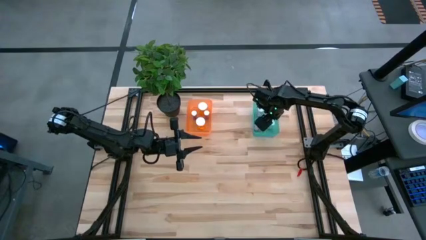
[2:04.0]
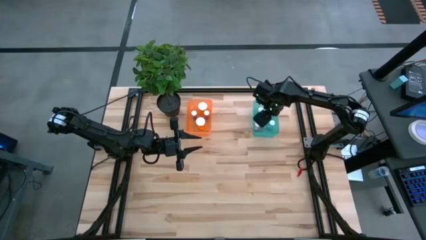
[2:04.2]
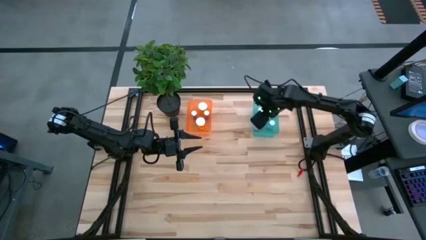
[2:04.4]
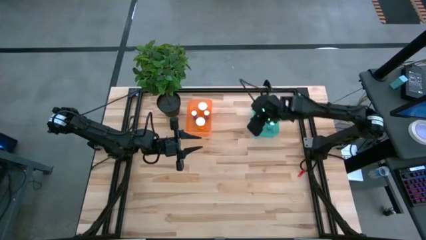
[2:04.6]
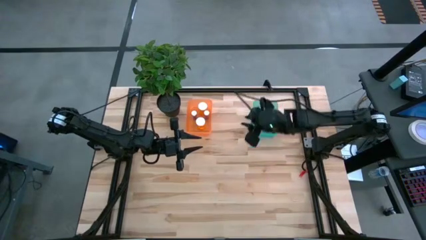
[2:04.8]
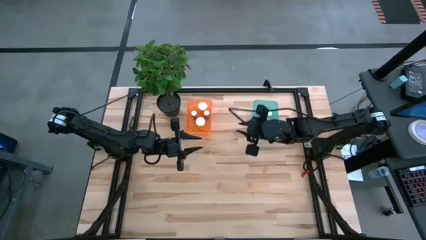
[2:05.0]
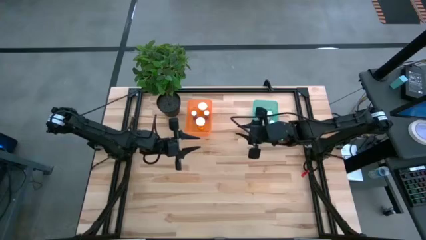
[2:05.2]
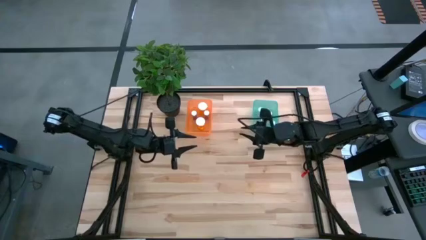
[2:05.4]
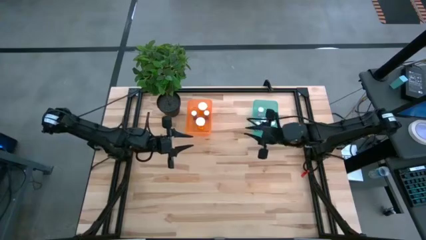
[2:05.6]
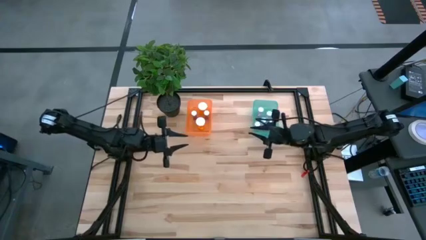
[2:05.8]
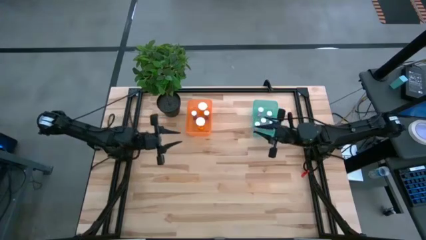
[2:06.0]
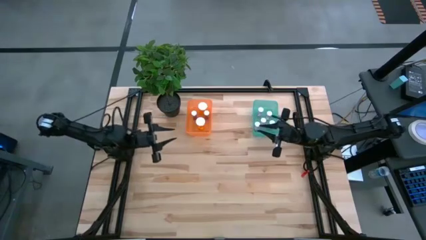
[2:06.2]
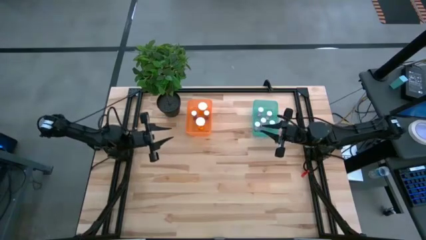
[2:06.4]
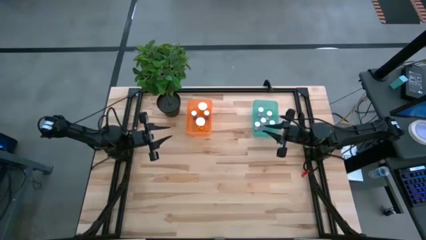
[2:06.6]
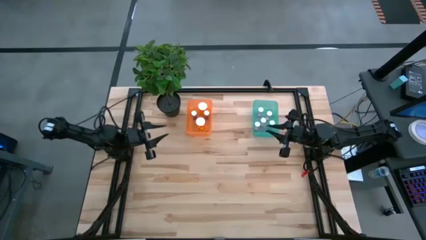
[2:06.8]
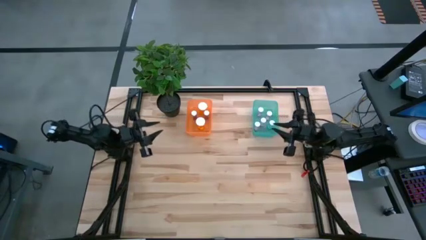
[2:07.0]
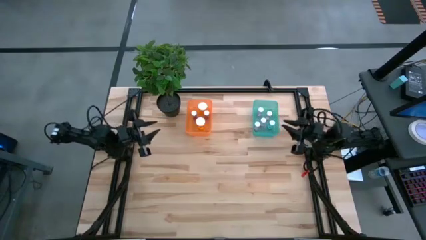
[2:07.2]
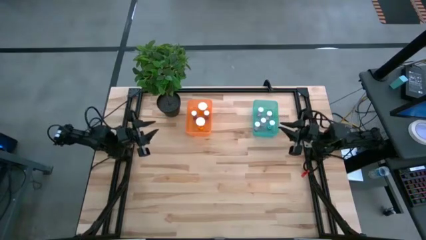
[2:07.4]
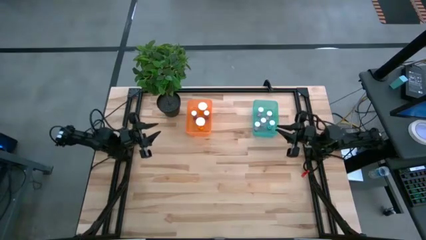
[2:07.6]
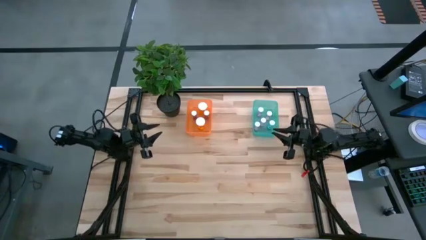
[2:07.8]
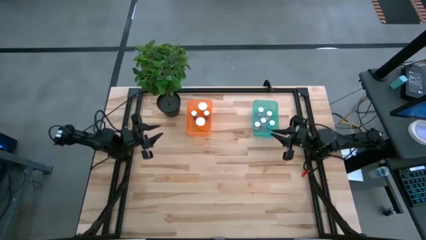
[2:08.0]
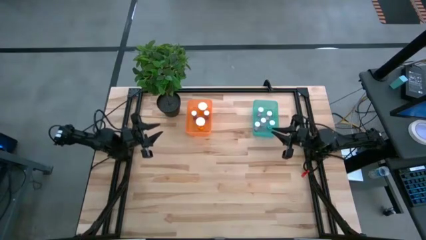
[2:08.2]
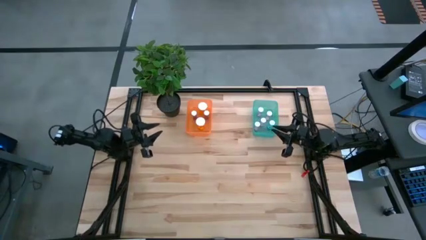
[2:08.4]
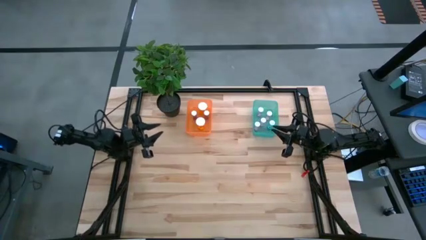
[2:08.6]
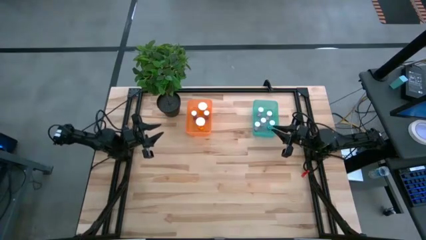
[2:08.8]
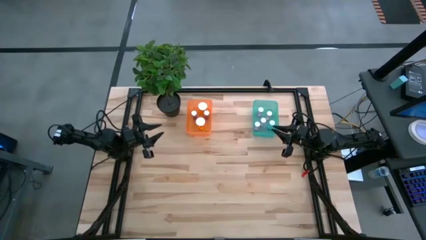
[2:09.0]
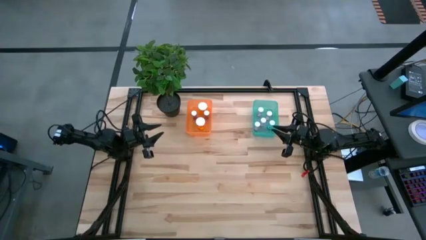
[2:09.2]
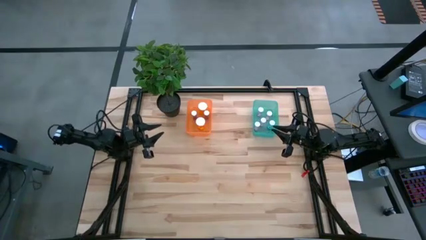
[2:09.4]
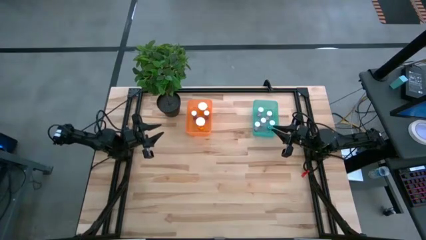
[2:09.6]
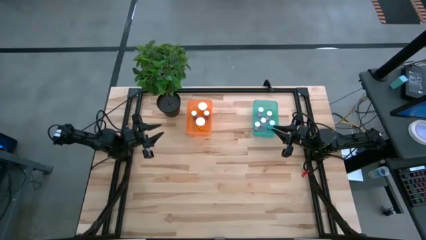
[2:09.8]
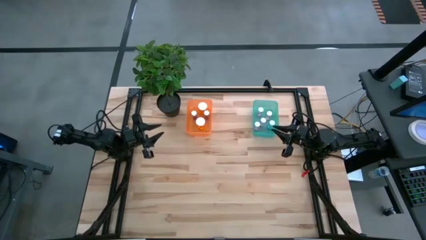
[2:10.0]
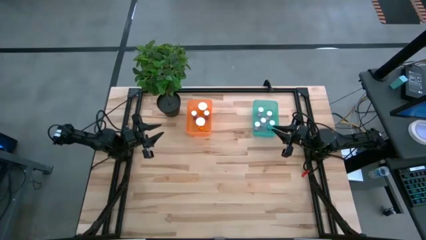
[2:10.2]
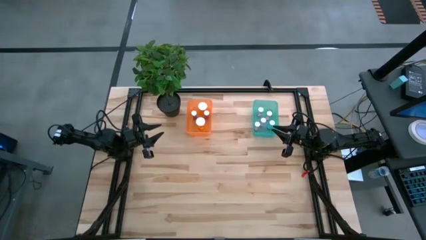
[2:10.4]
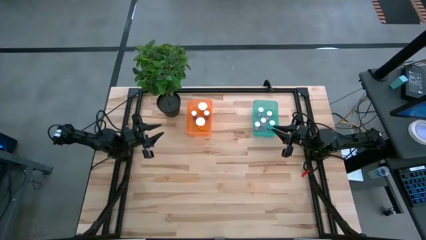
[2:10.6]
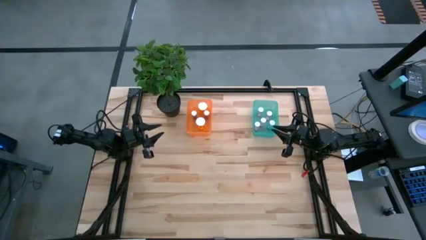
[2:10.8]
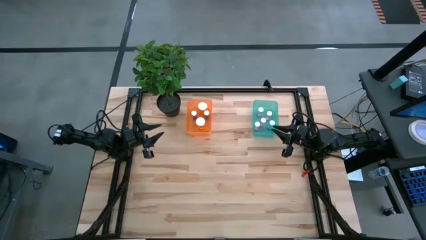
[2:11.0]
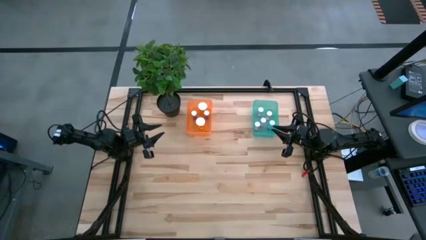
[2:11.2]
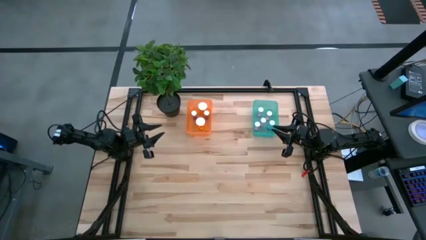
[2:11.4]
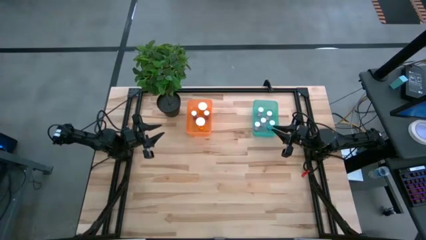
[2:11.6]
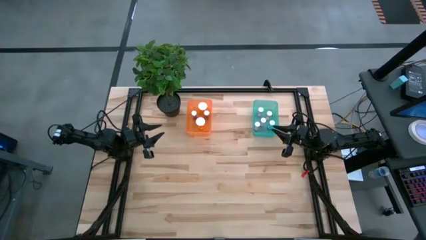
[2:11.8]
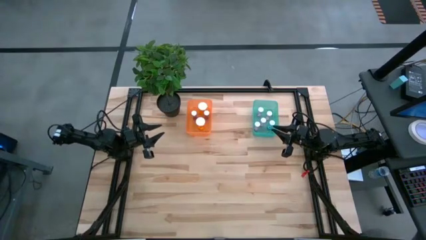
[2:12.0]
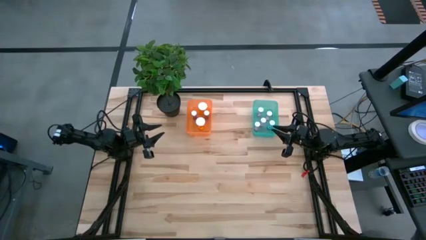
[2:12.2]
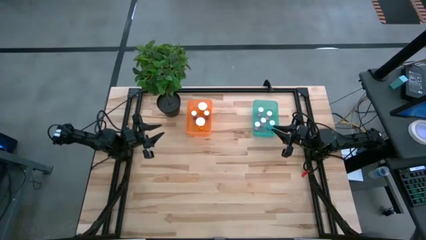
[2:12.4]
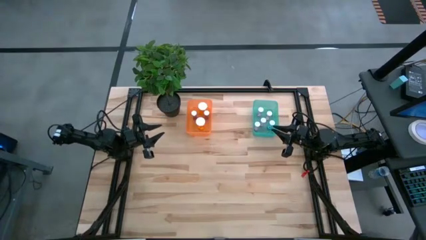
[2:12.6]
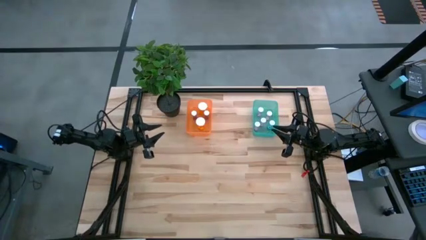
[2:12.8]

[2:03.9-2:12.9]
Task: Pick and place medicine bottles into bin by pill shape (circle, oval)
Return to Home Position

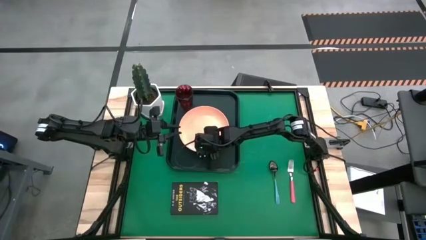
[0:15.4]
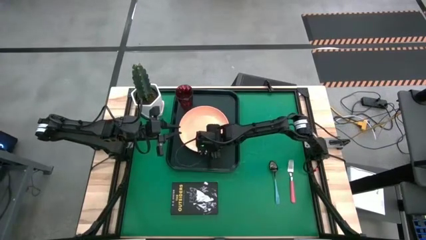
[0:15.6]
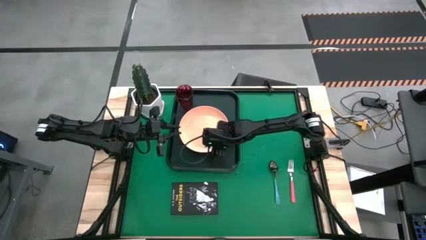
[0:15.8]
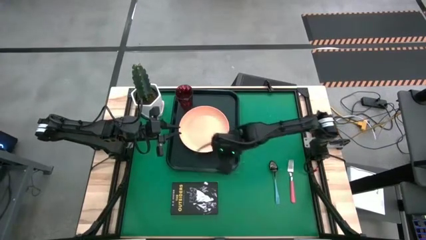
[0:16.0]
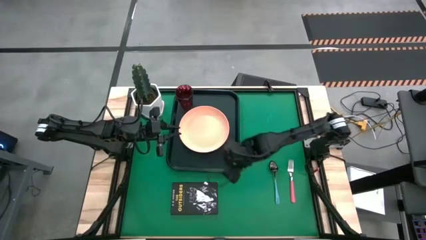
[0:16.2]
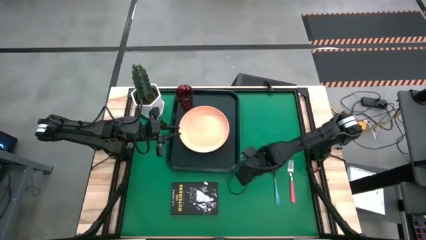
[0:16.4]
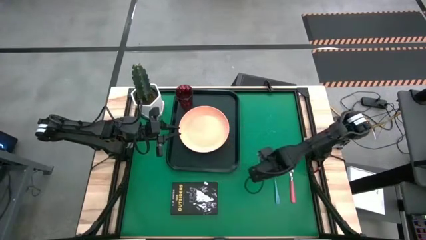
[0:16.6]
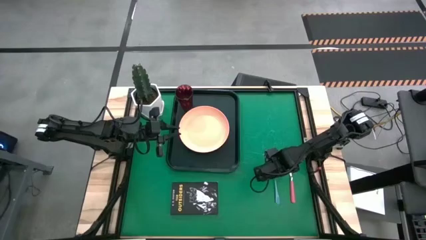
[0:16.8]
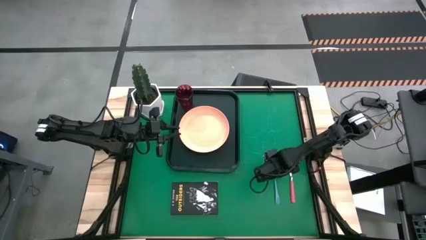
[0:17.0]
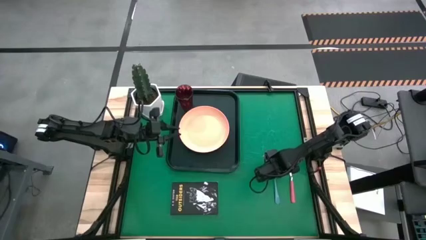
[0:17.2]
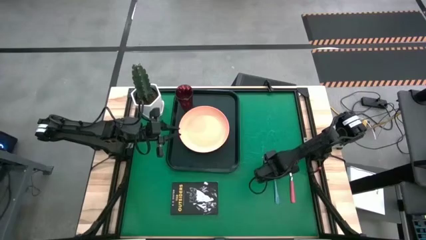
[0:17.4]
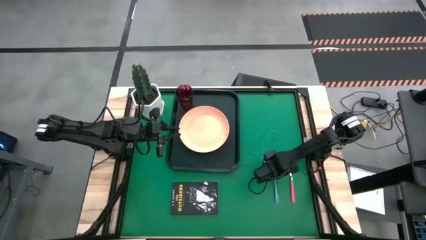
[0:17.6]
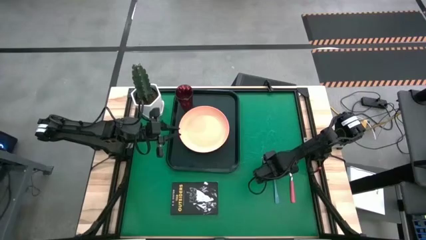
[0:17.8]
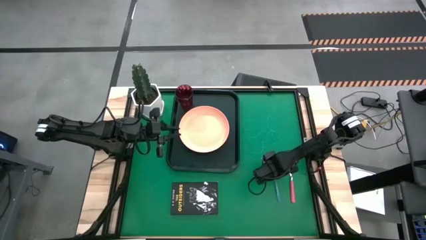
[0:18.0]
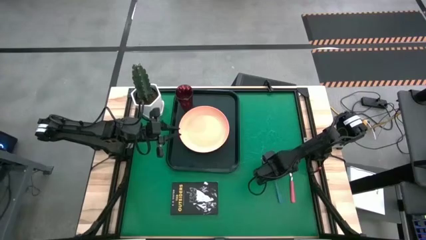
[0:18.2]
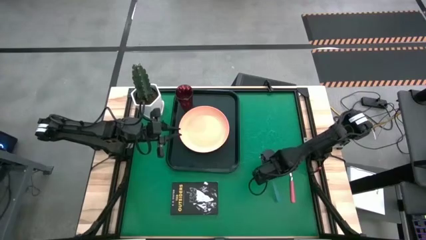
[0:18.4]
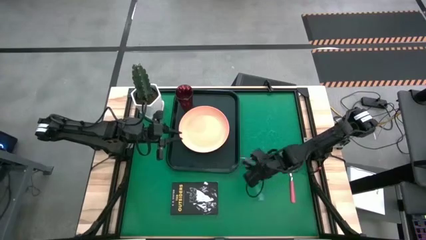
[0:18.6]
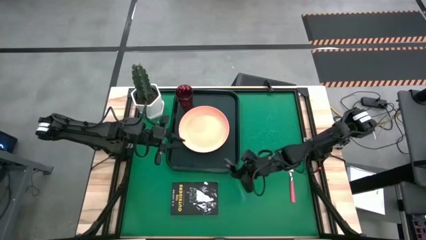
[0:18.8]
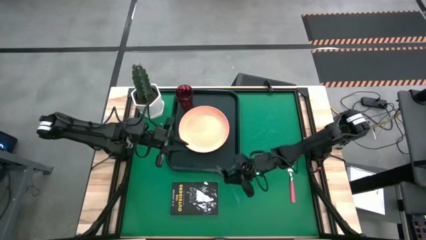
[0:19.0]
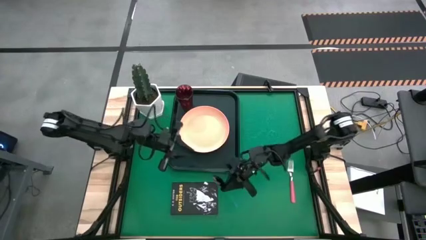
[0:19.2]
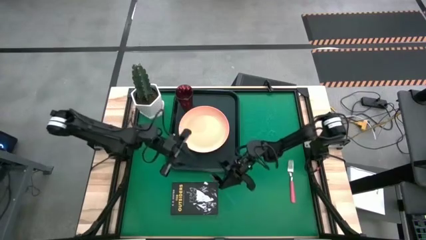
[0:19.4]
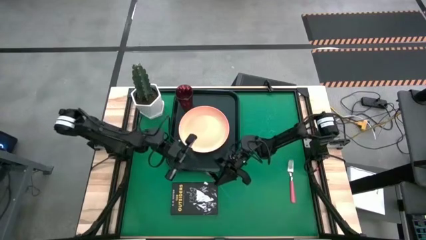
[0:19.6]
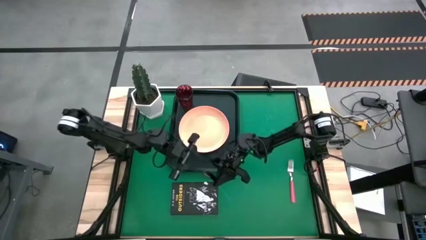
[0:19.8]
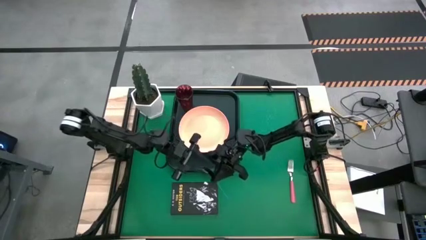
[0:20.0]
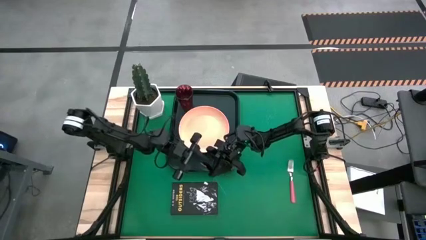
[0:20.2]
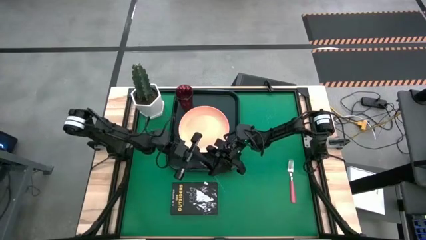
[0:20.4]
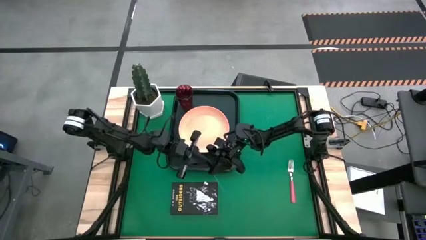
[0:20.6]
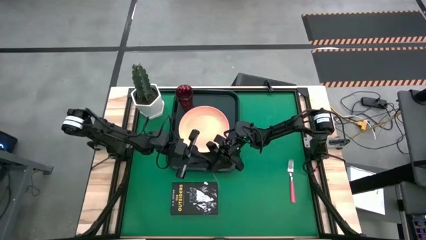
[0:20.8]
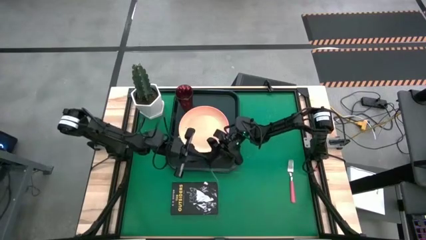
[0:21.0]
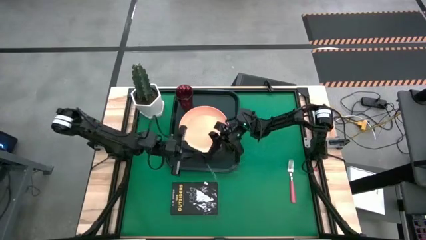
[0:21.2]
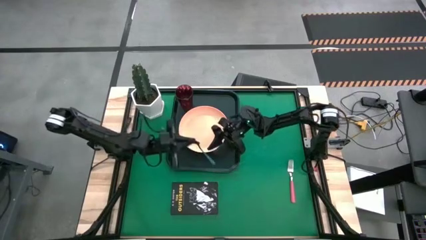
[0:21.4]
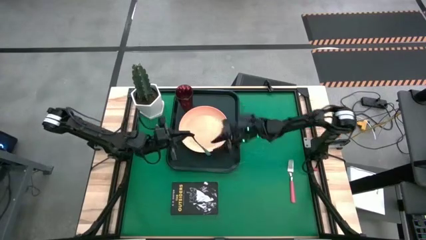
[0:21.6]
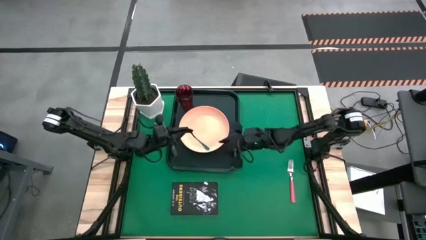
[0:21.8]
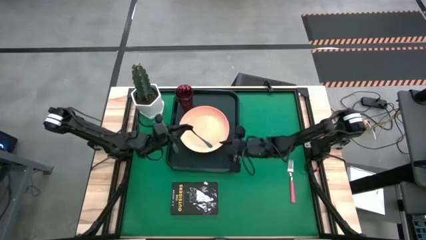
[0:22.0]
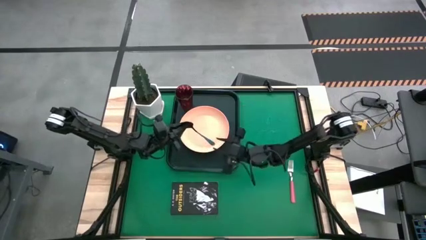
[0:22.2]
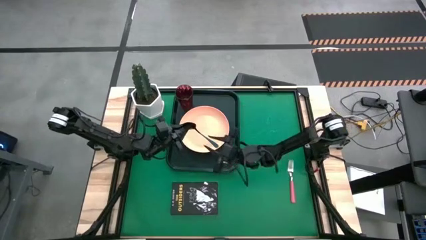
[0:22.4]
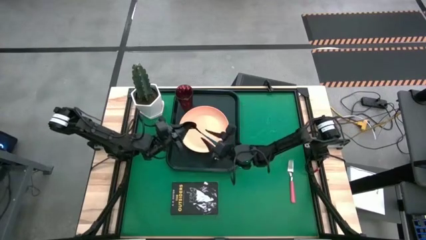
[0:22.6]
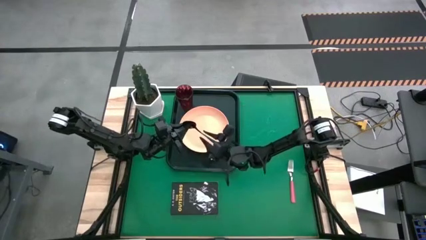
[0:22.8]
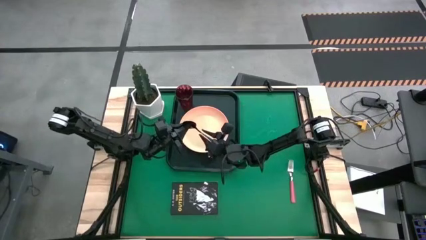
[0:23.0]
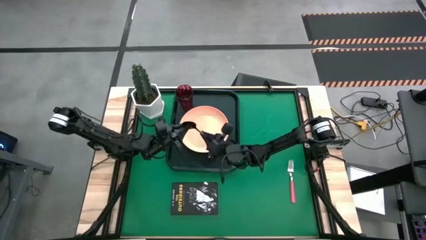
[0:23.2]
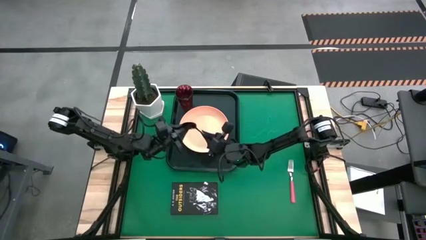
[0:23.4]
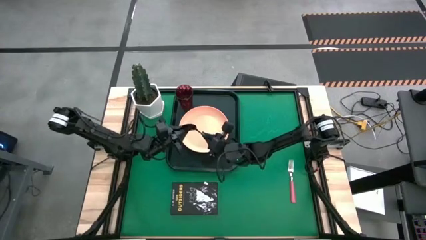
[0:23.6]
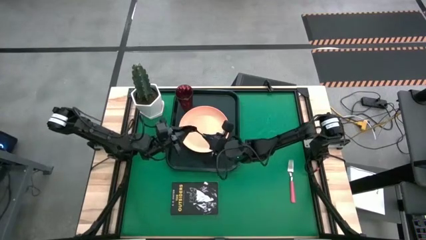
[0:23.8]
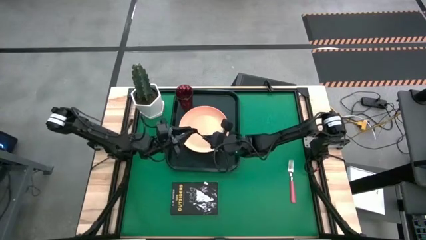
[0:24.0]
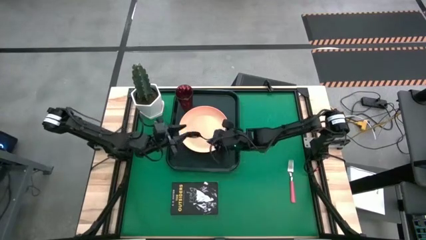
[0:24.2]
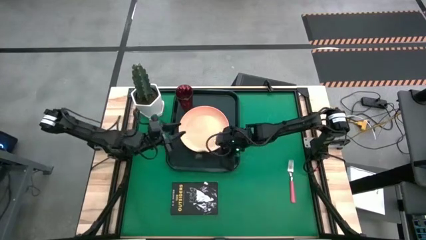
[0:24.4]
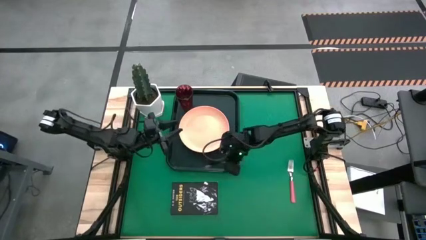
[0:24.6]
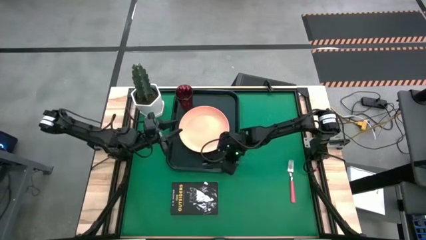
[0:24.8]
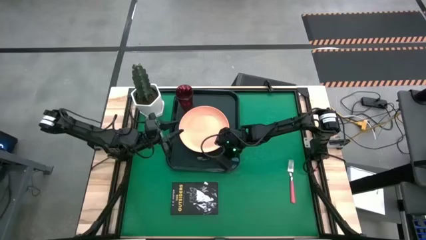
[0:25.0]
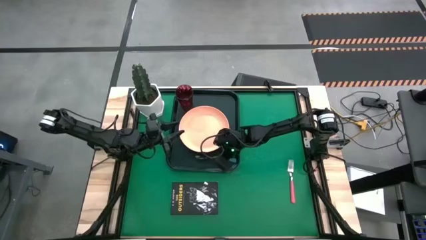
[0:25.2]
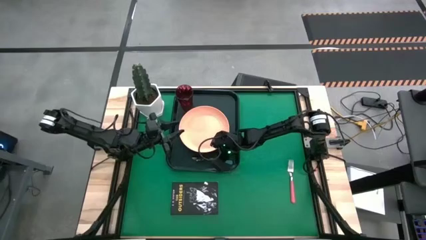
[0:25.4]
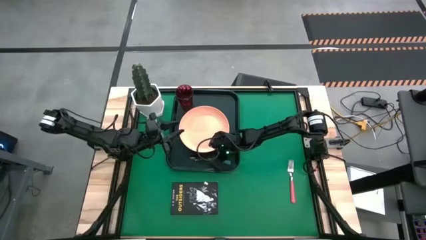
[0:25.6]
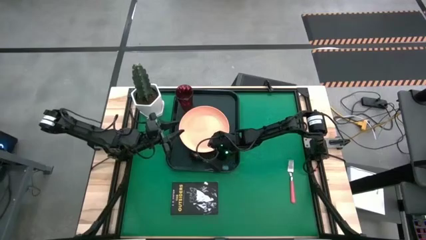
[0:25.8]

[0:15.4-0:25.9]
Task: Pick and place plate/cup/fork/spoon on tray
Put the blue spoon on the black tray below the orange plate
